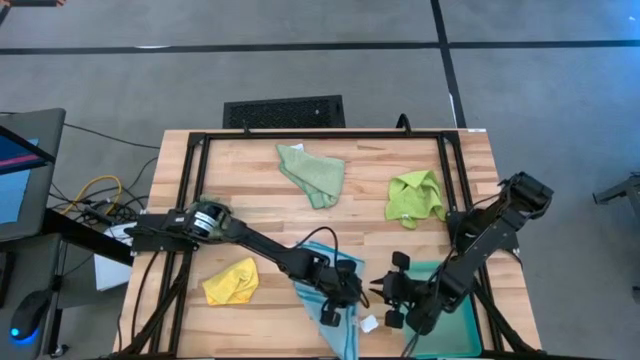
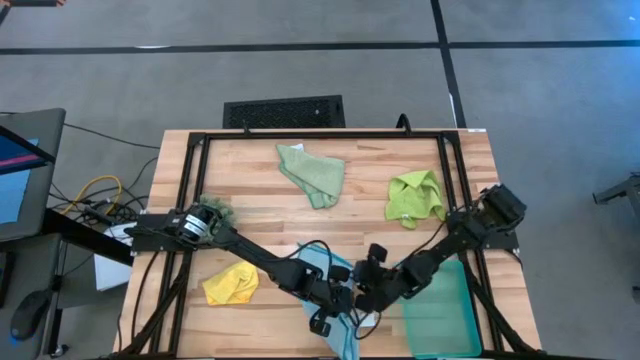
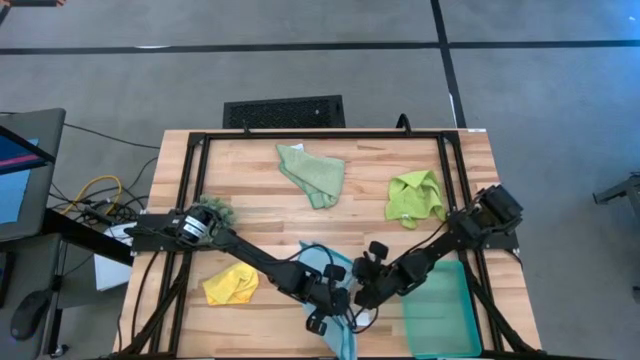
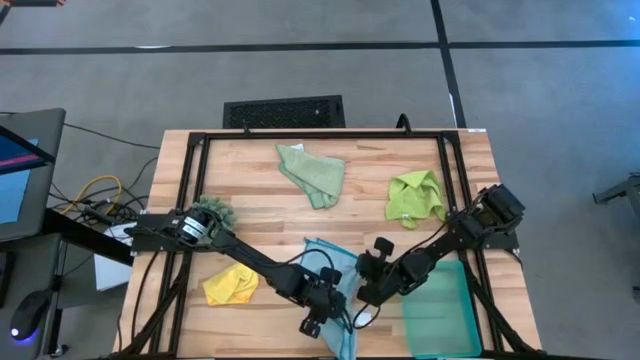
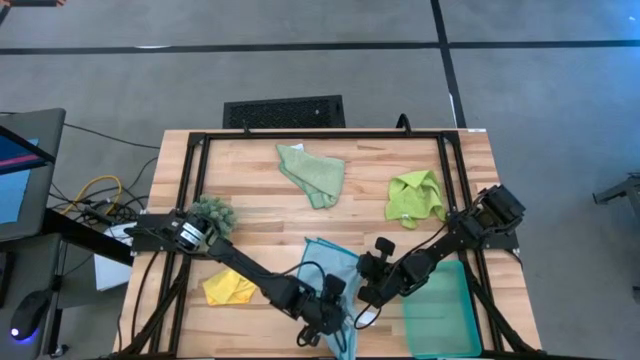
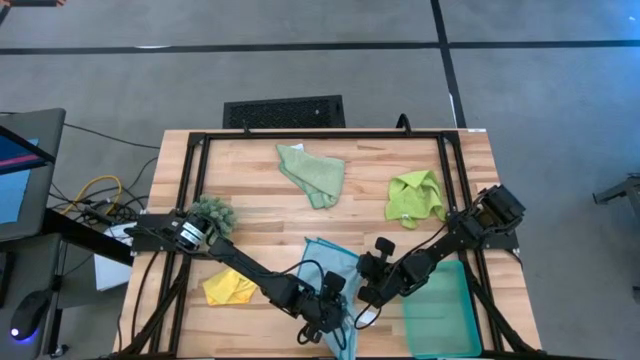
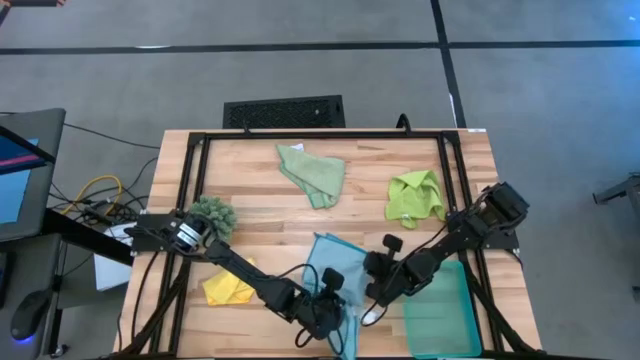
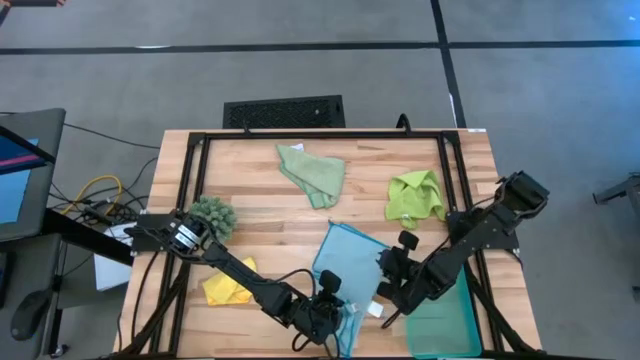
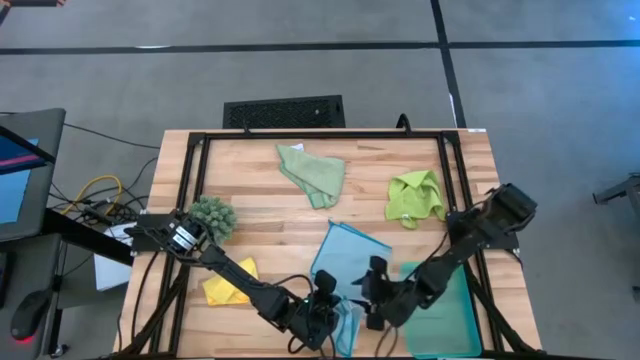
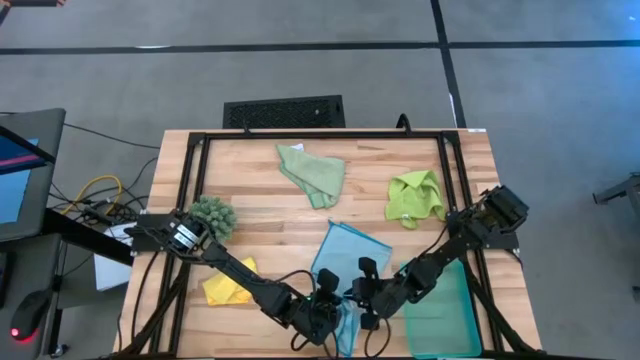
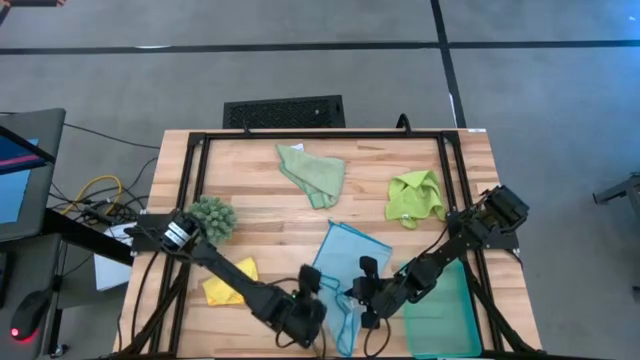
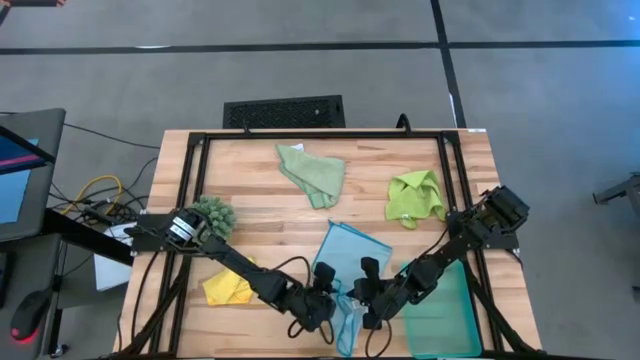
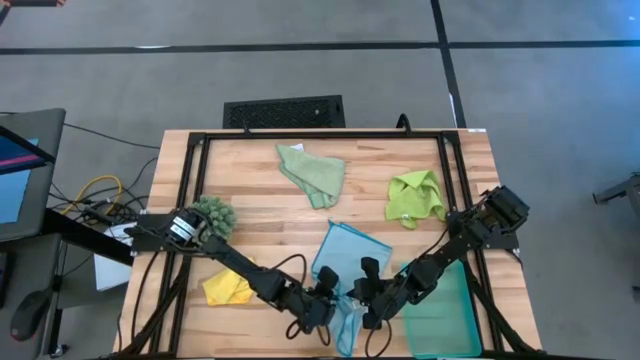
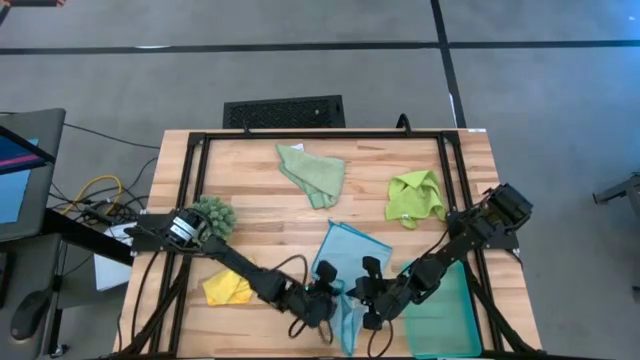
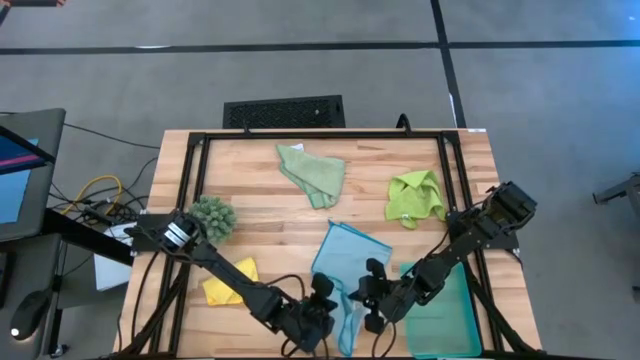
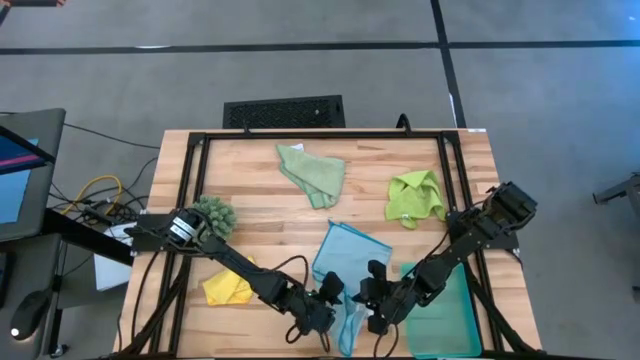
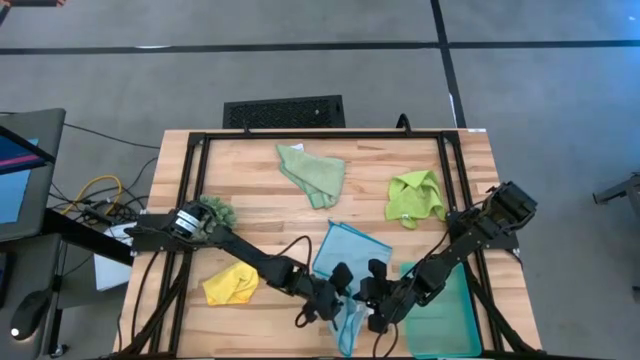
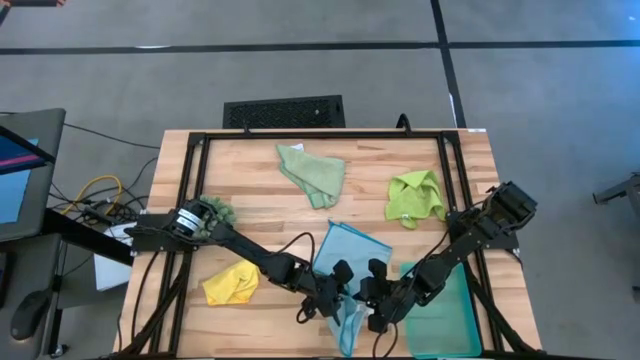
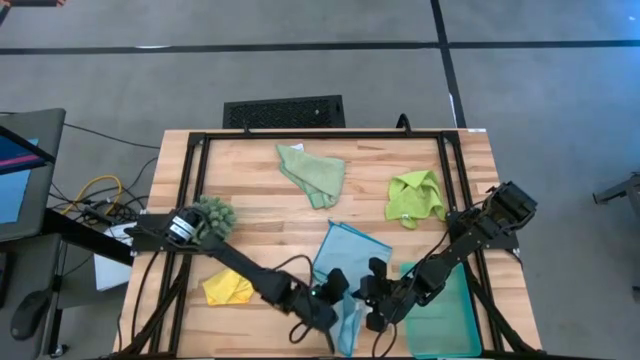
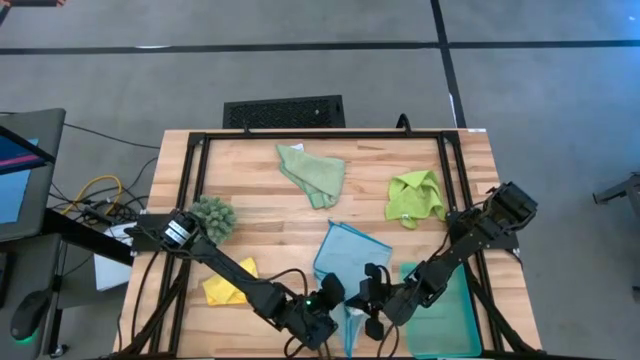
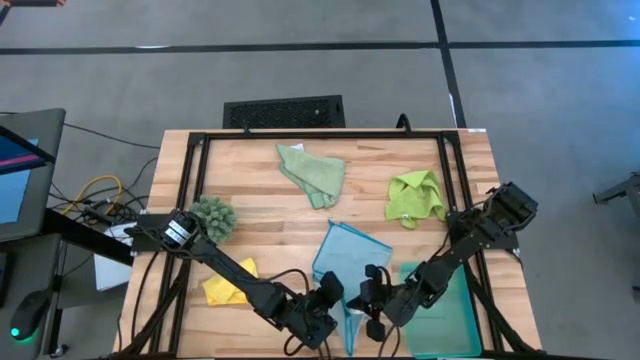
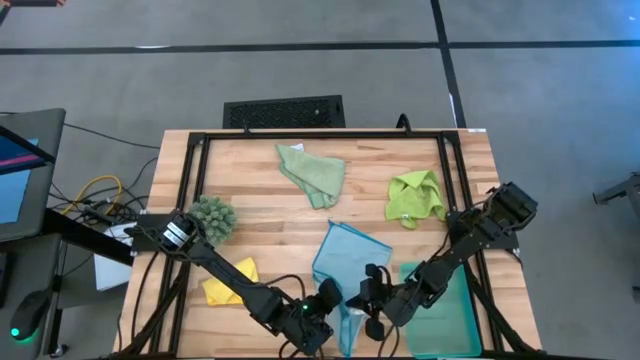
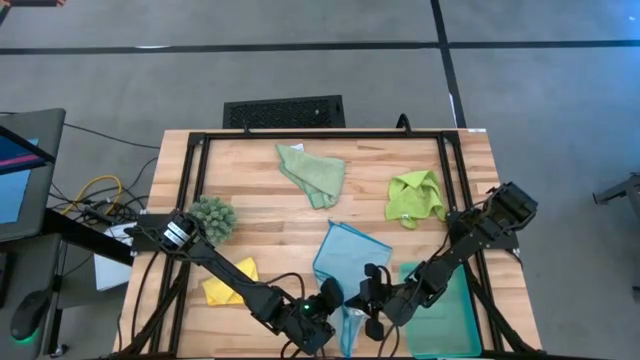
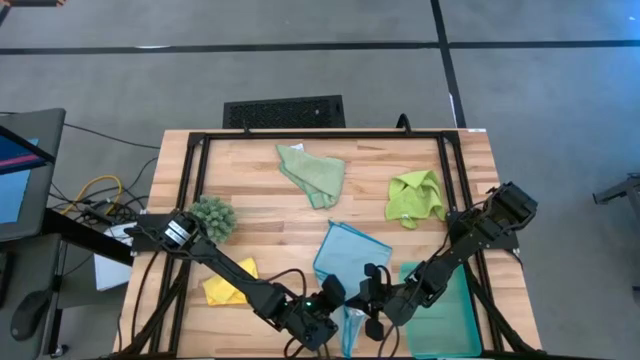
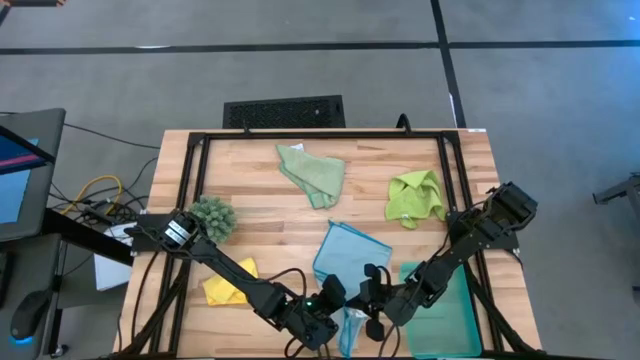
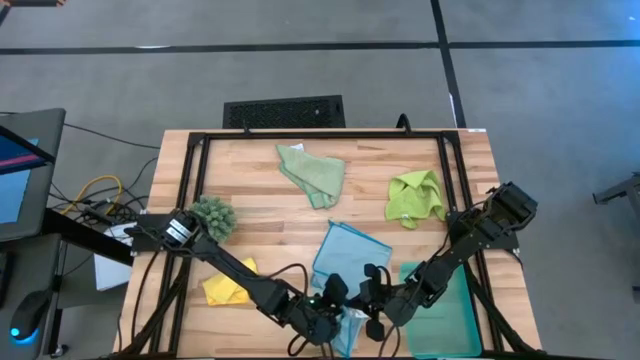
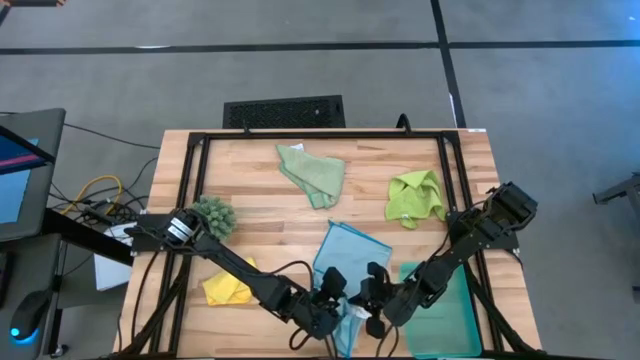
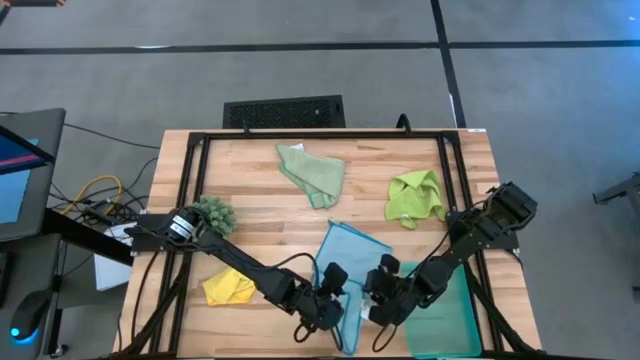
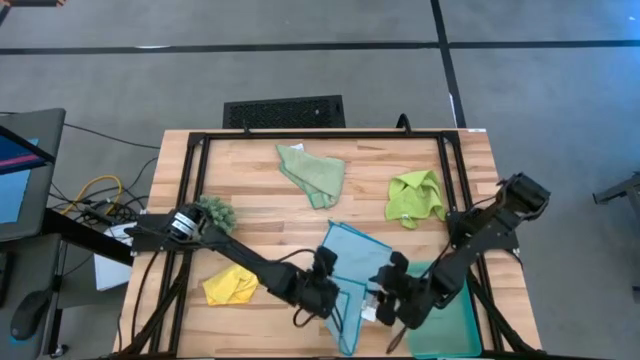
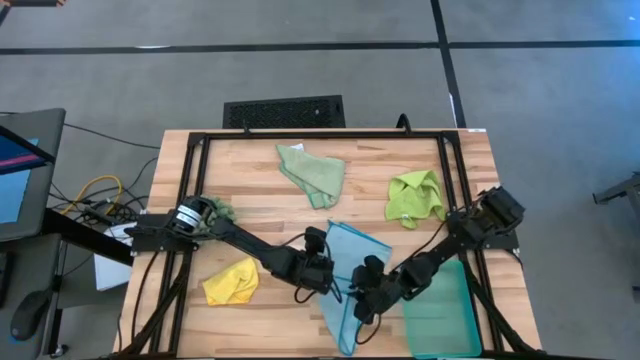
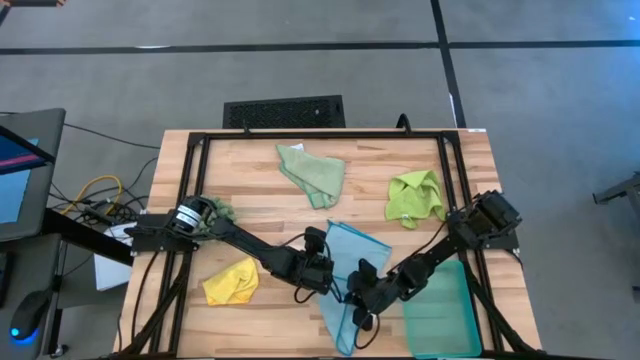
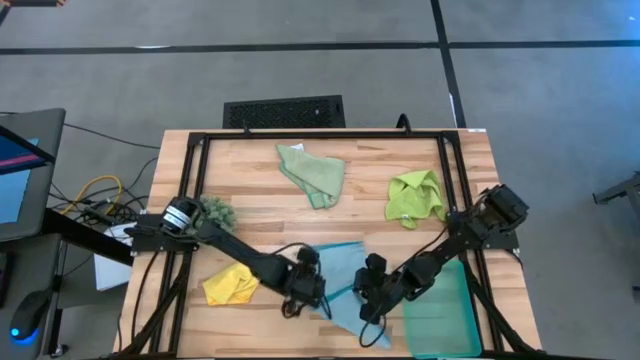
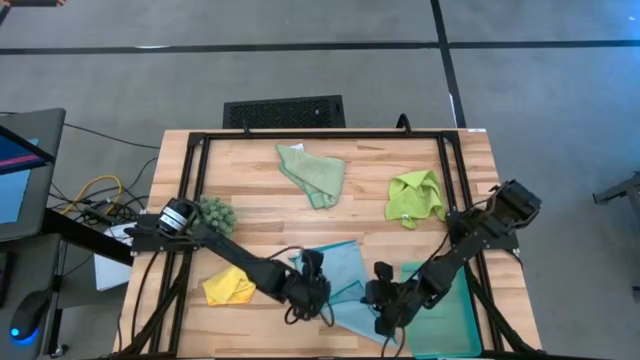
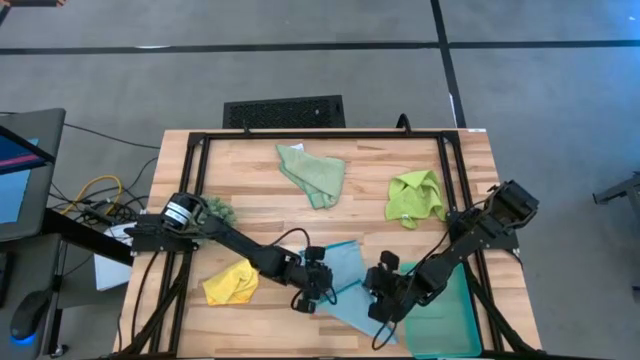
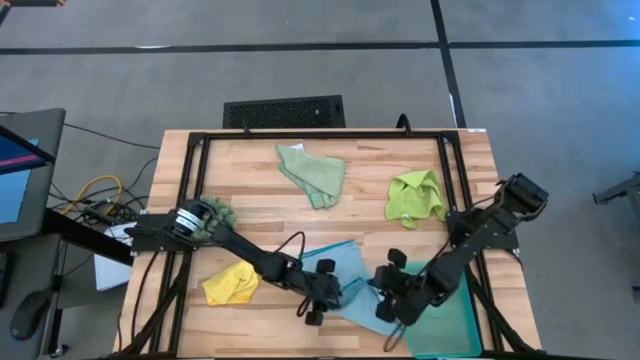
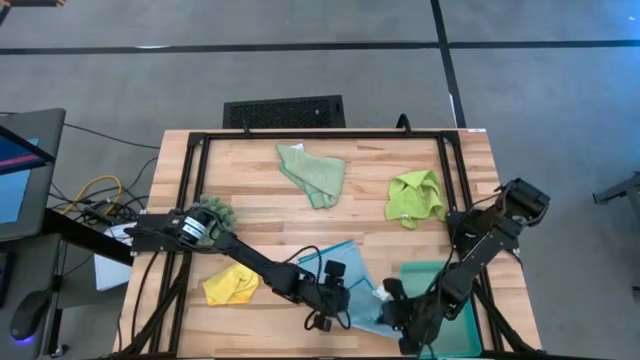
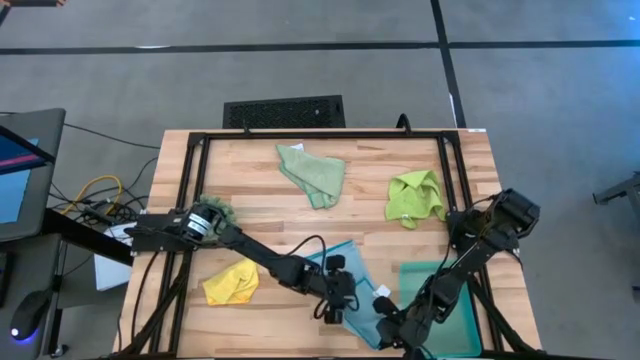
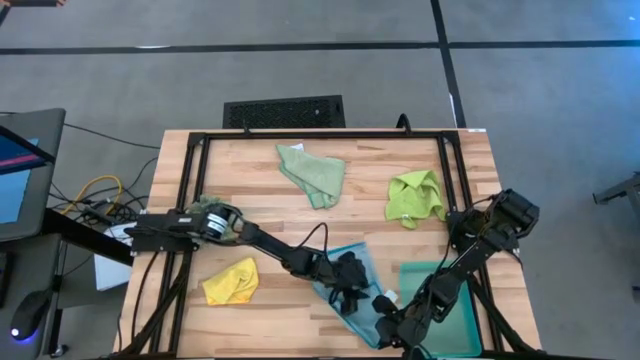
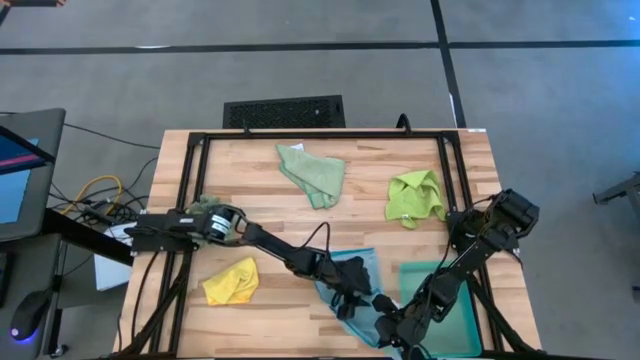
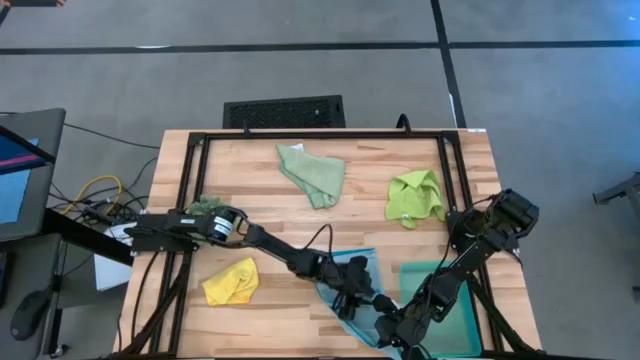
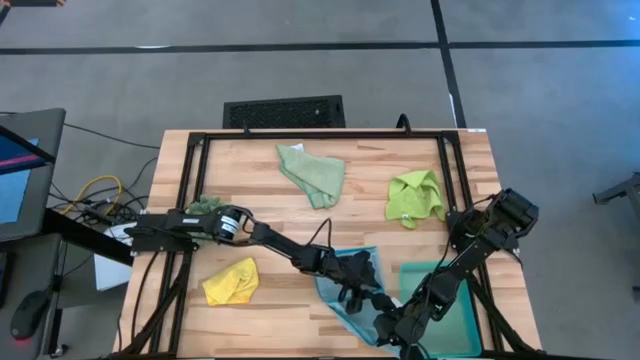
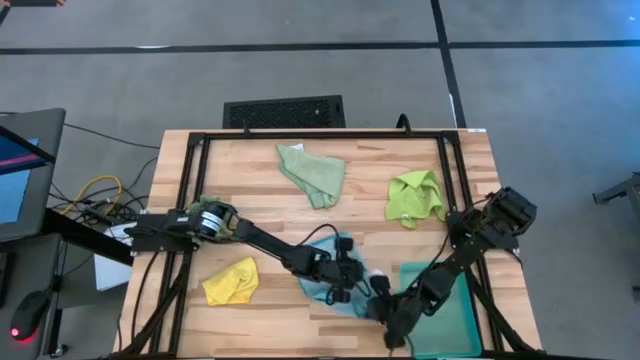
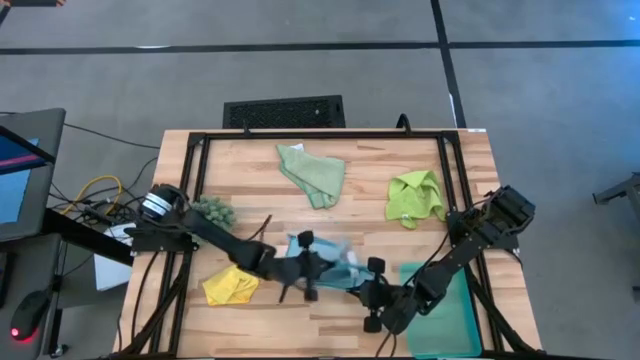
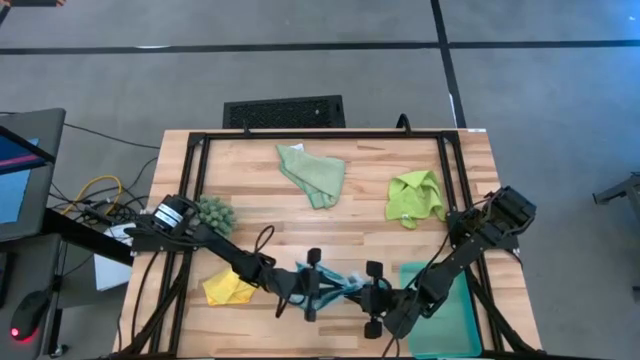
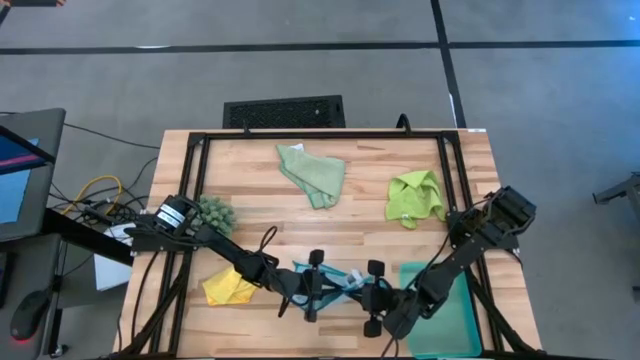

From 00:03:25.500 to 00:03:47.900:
Task: Fold microfiber towels
Fold the blue microfiber cloth
